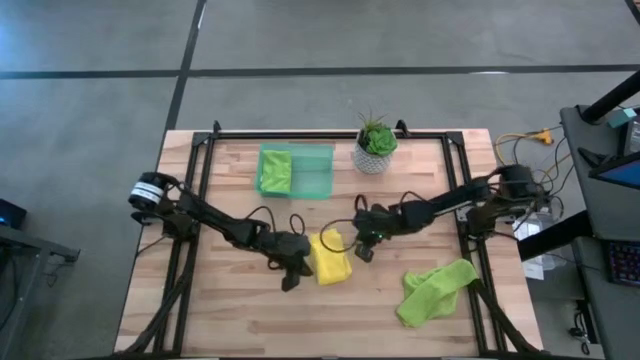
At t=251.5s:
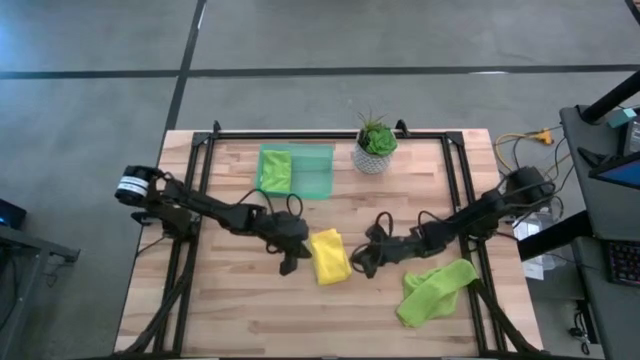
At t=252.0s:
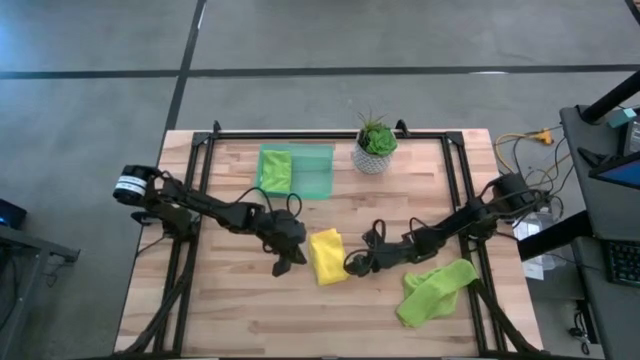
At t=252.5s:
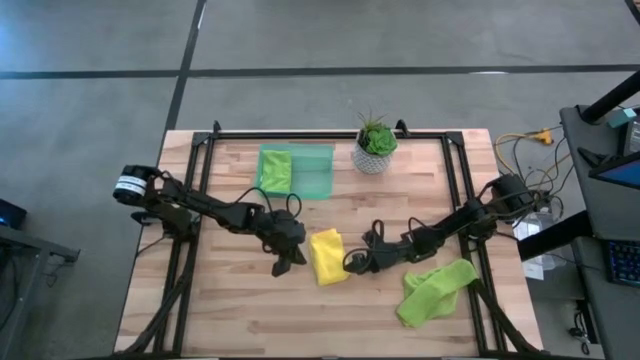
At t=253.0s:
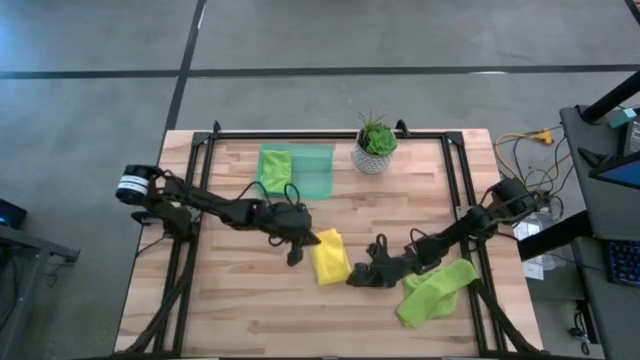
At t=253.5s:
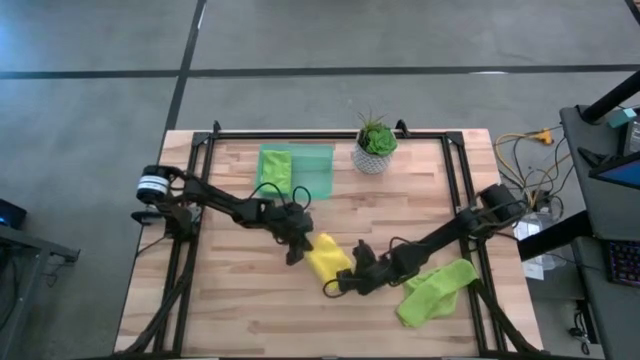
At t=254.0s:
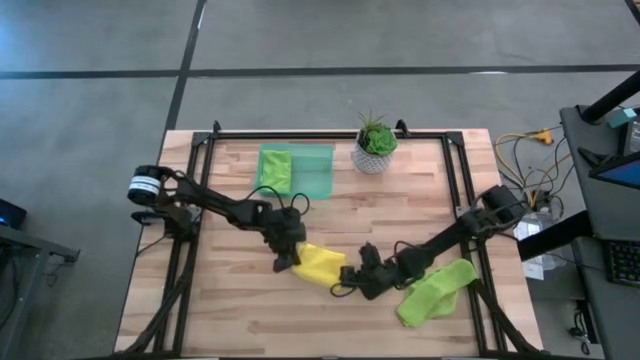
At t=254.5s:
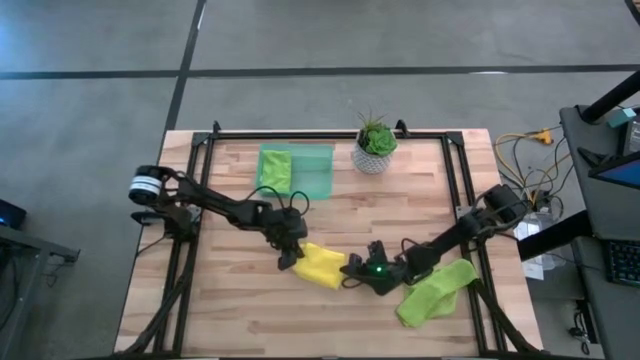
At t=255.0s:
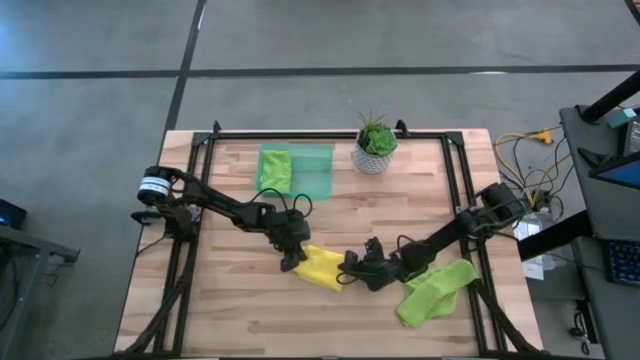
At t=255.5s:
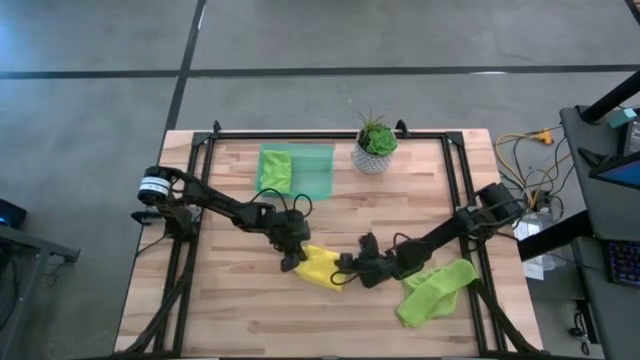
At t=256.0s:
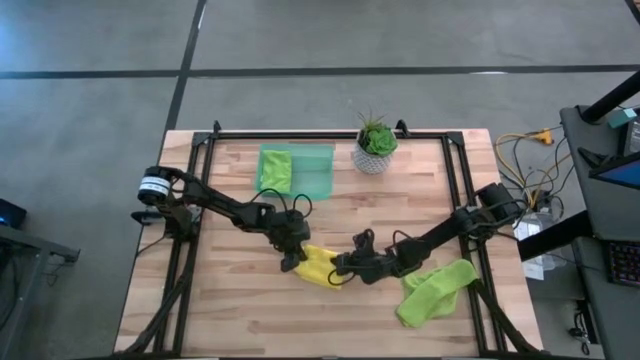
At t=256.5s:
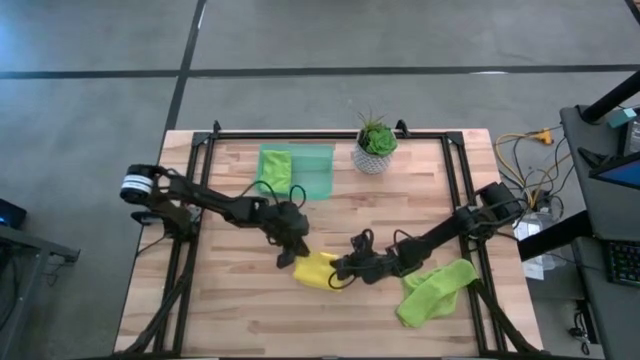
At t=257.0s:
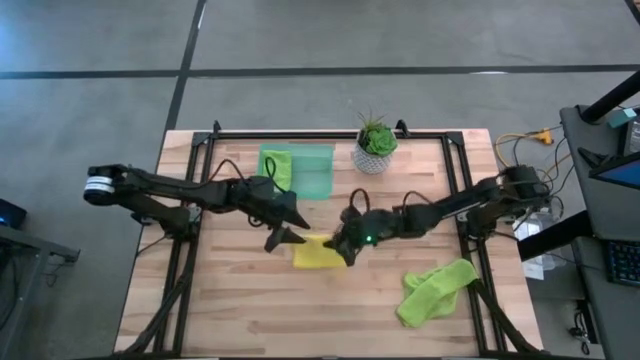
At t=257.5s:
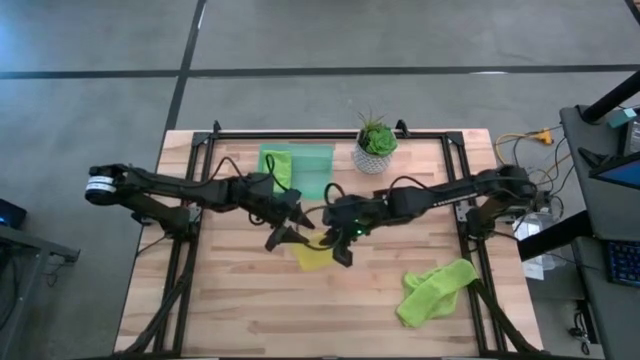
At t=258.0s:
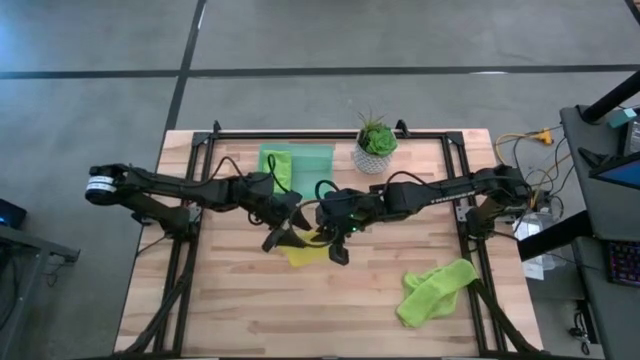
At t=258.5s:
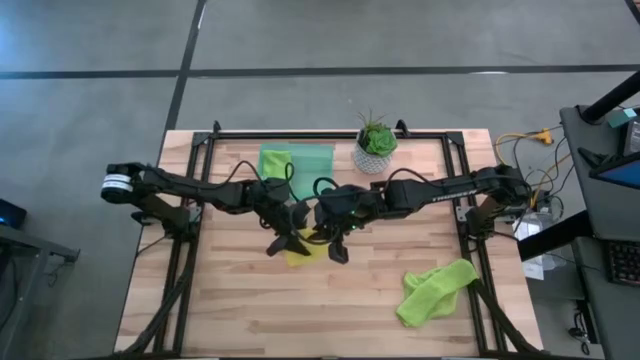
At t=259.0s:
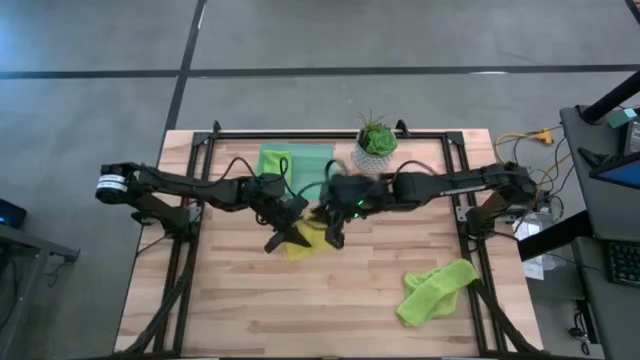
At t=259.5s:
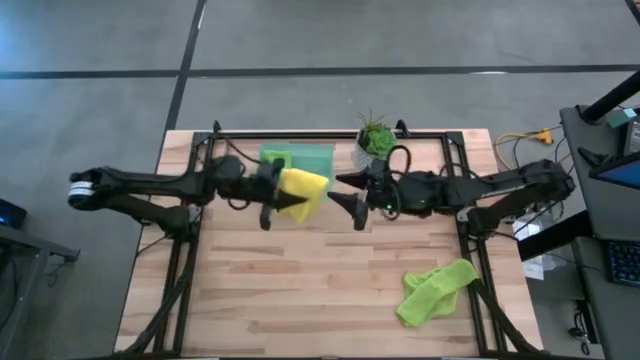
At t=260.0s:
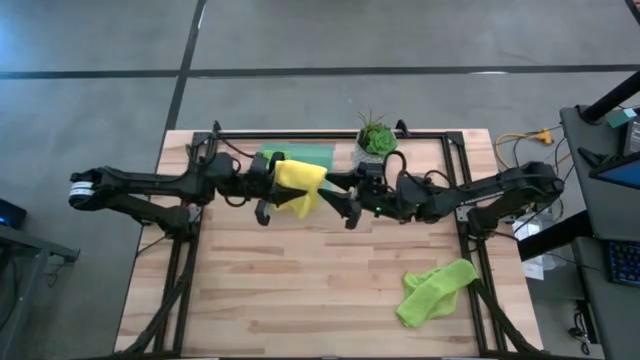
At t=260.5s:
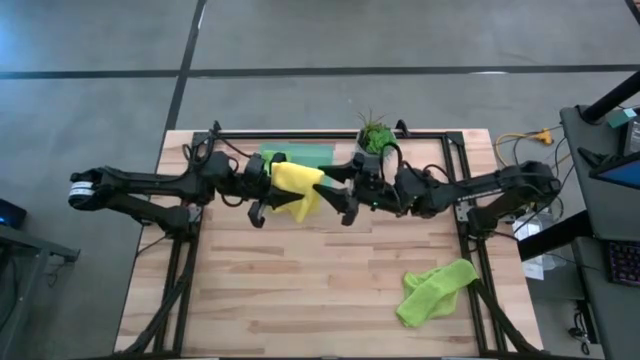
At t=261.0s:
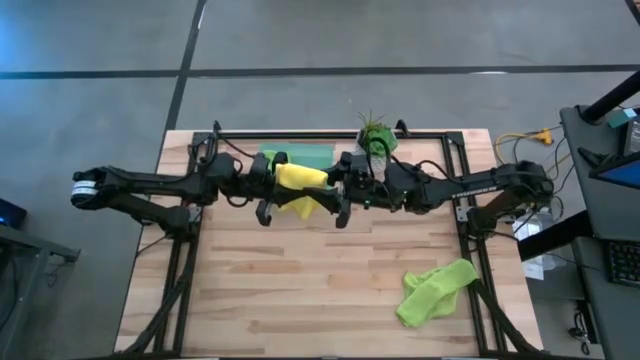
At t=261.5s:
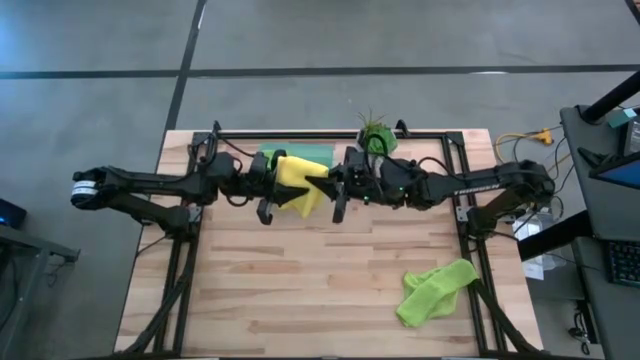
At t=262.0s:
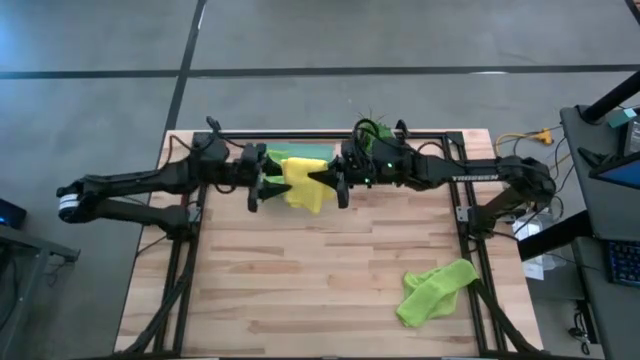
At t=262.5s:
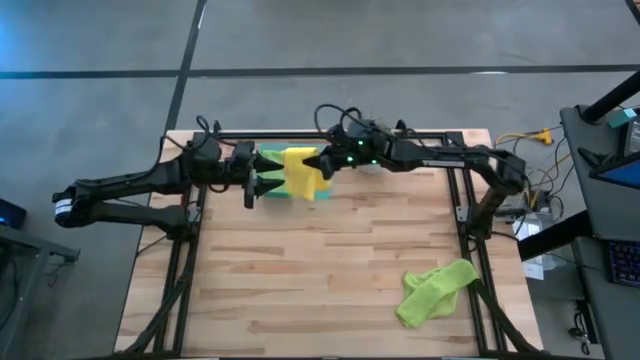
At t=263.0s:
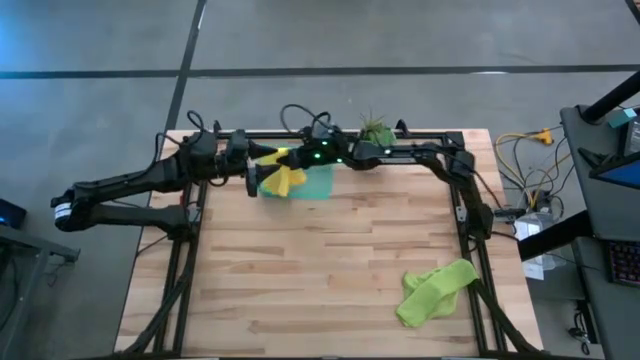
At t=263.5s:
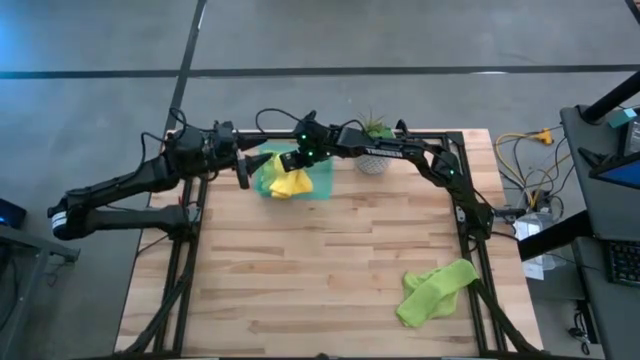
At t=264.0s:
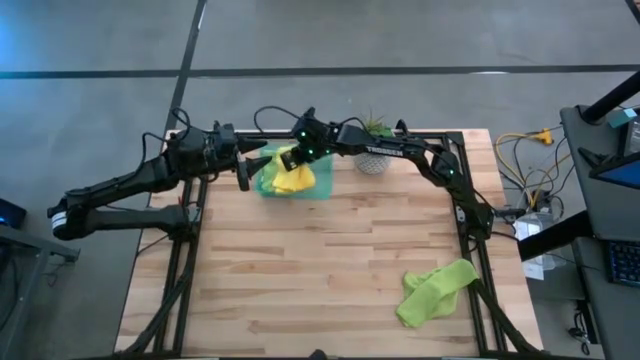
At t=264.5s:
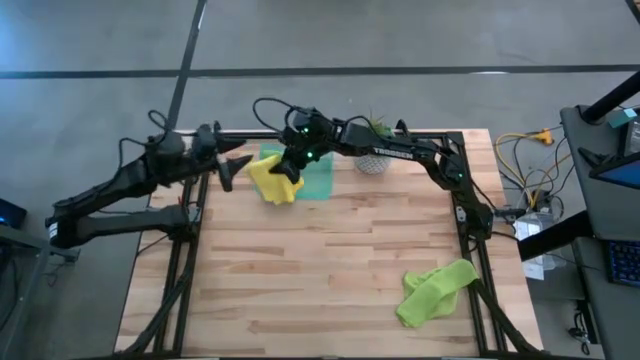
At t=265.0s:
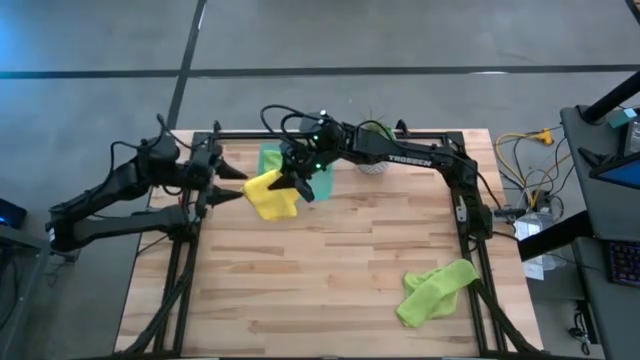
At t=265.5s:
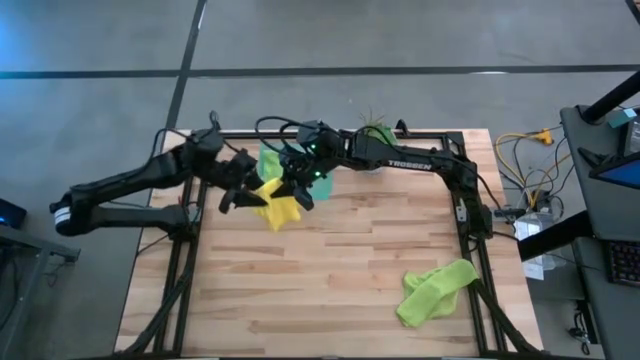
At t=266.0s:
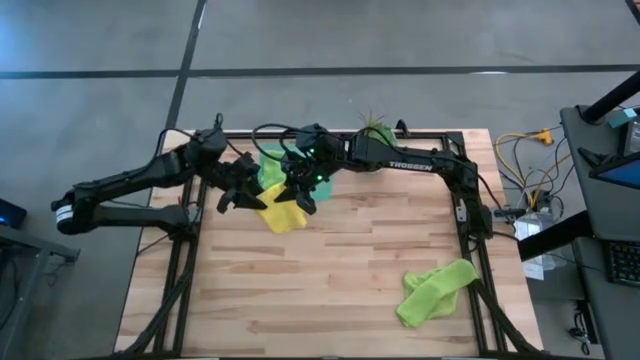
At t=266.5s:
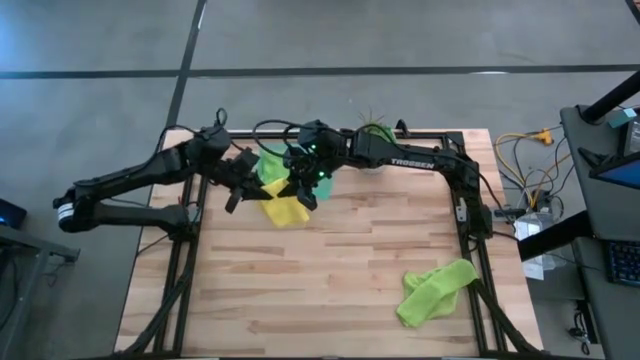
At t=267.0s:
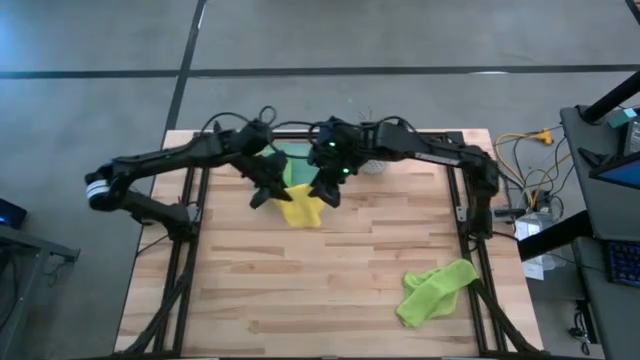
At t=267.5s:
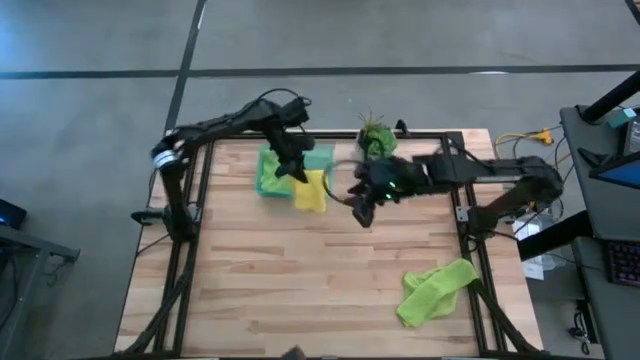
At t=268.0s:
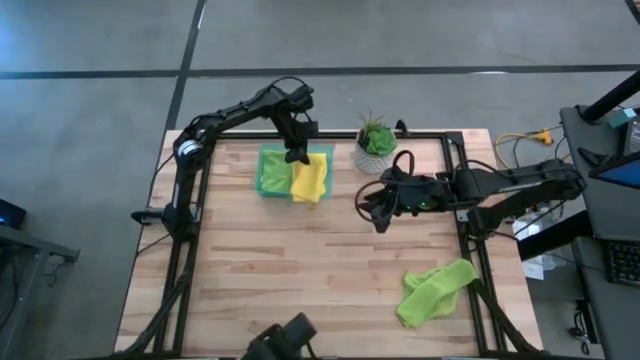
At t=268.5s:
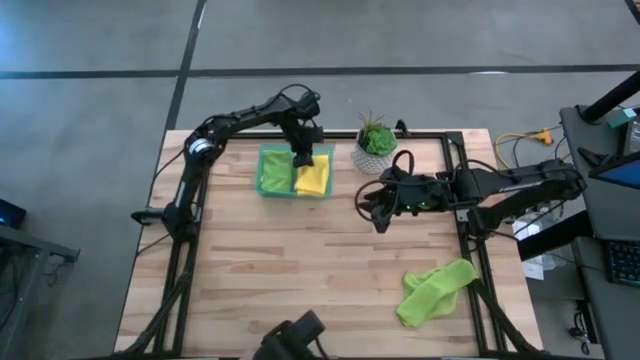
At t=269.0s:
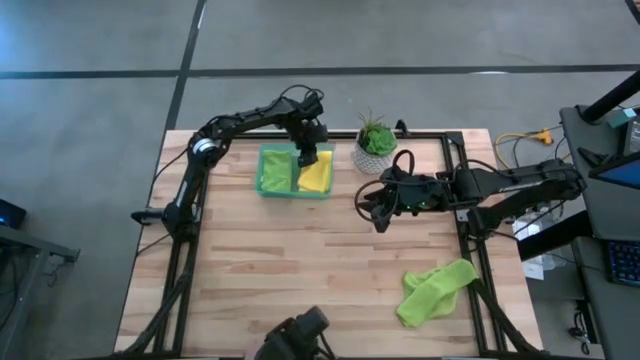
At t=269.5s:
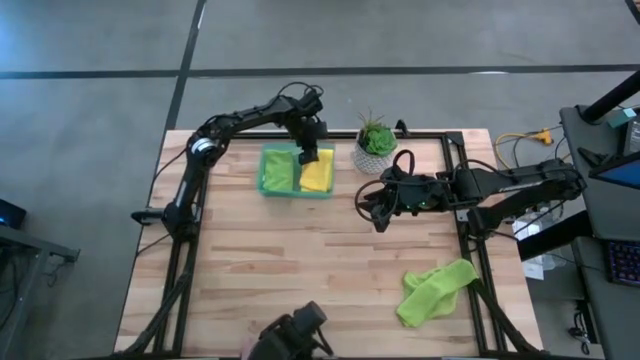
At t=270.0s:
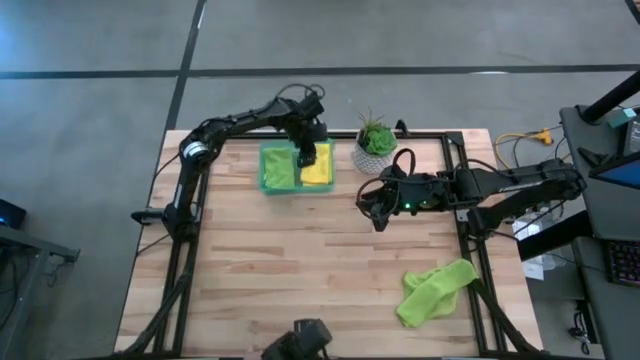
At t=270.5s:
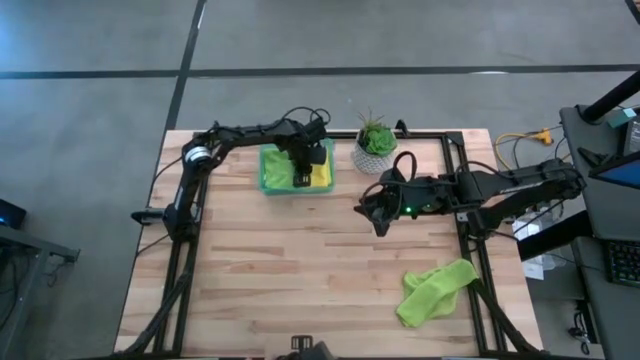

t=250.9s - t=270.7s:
Task: Fold microfiber towels
Put the folded yellow microfiber towel into the blue bin
